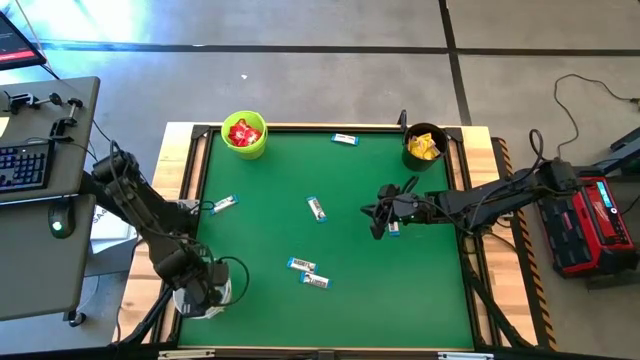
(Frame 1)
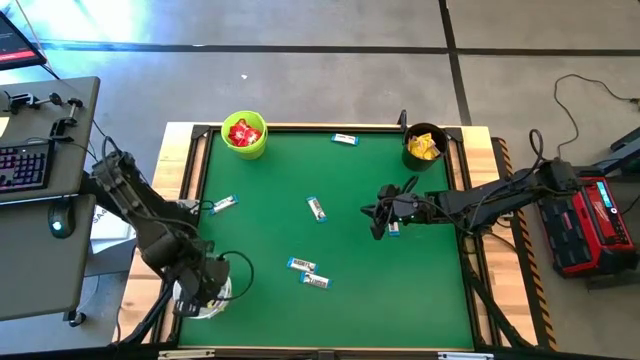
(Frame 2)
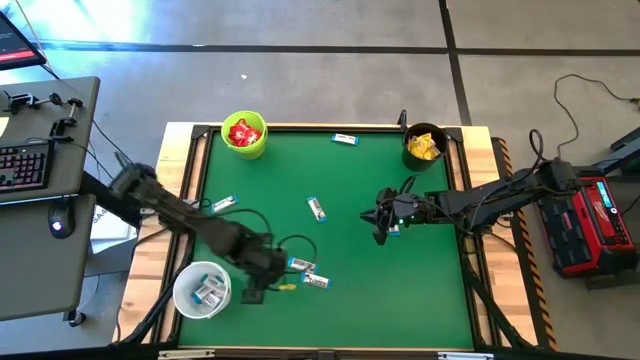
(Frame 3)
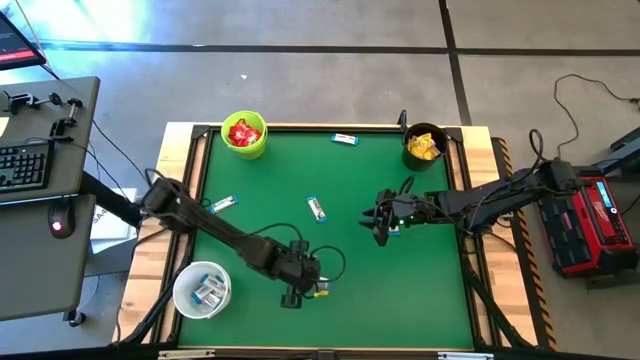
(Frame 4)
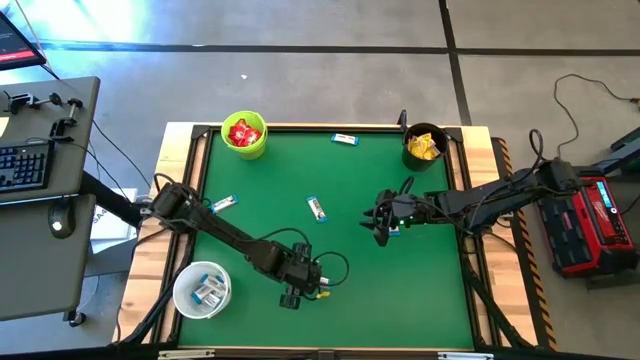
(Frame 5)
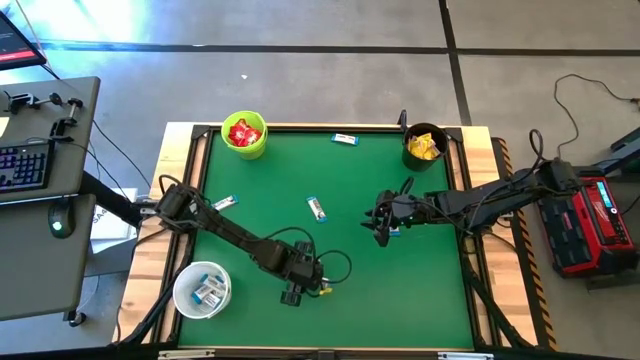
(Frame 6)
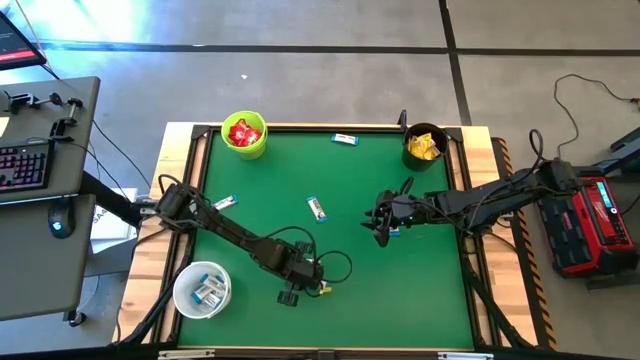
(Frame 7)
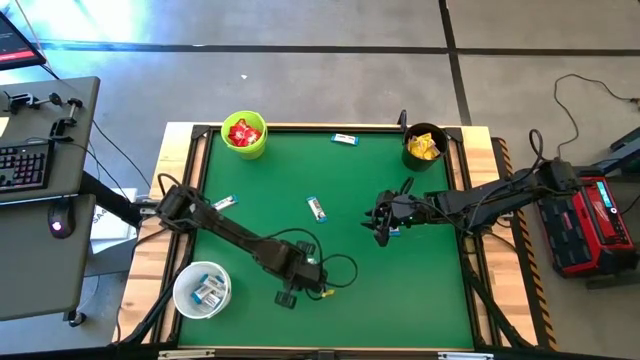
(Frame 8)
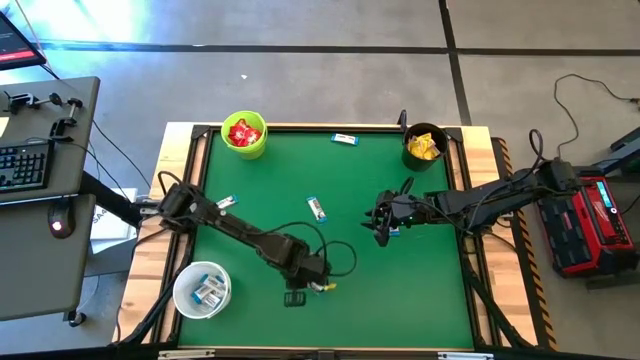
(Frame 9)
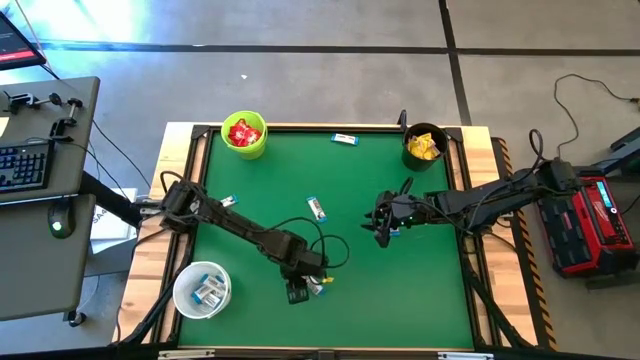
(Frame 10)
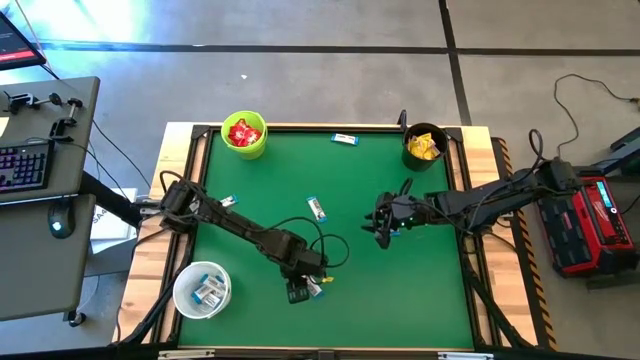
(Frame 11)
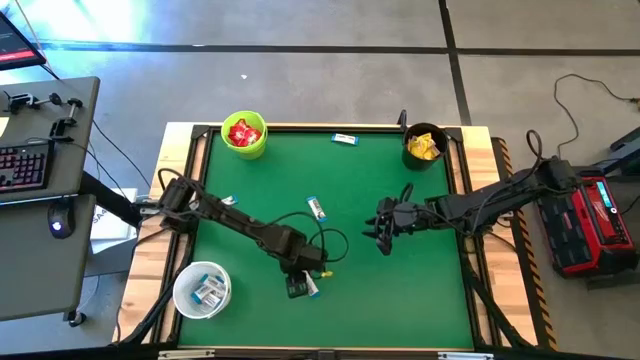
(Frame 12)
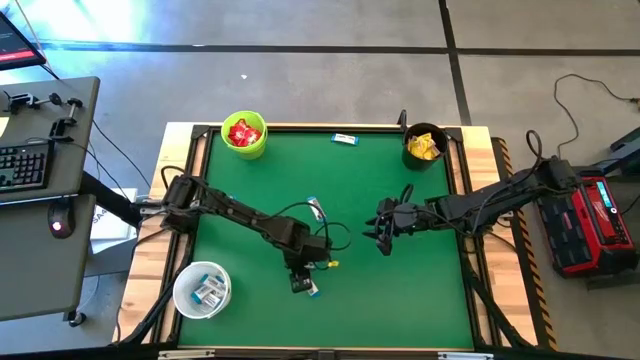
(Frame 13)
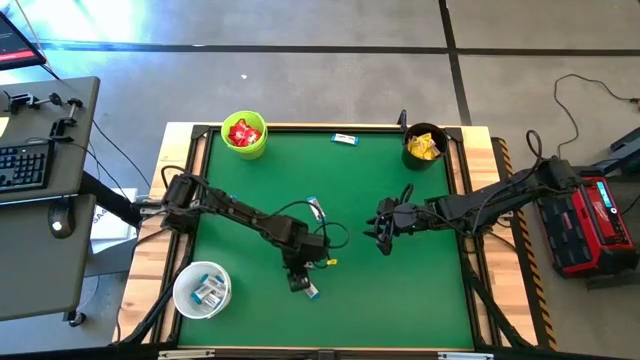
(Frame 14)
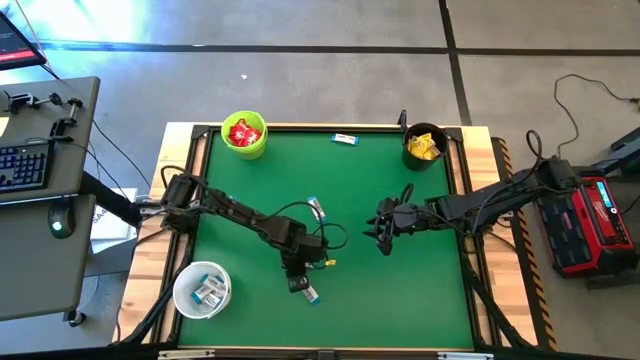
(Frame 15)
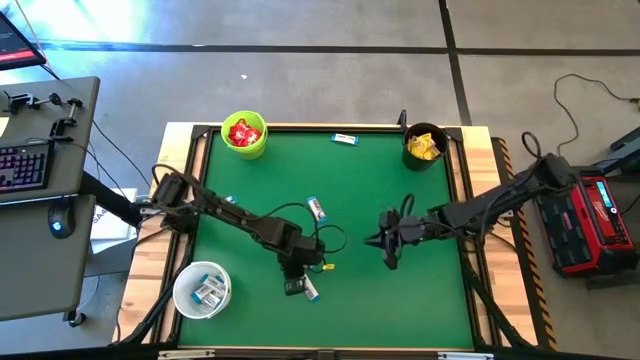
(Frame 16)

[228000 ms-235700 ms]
Task: Sort candy by brand, put in halloween buckets
Put the white chocolate into the white bucket

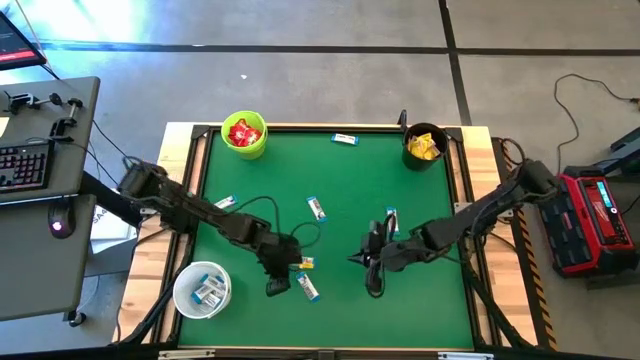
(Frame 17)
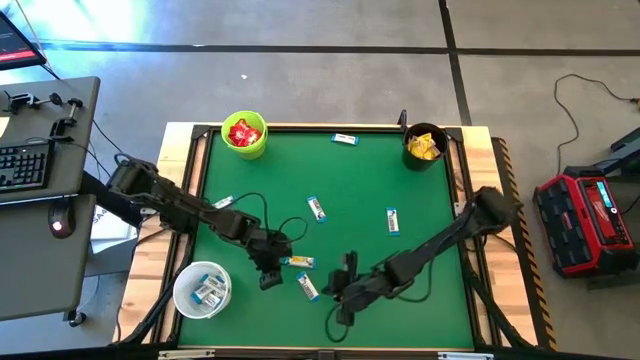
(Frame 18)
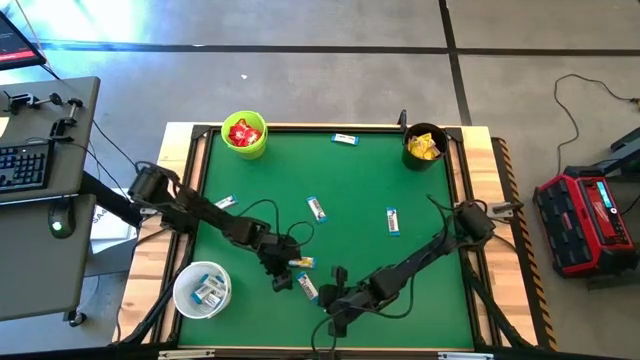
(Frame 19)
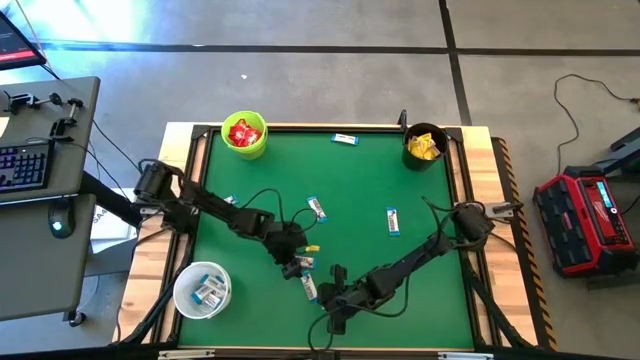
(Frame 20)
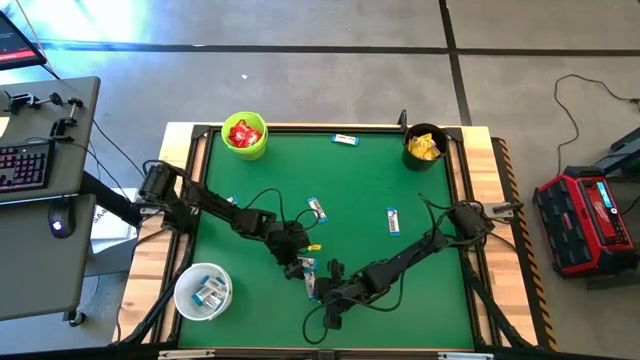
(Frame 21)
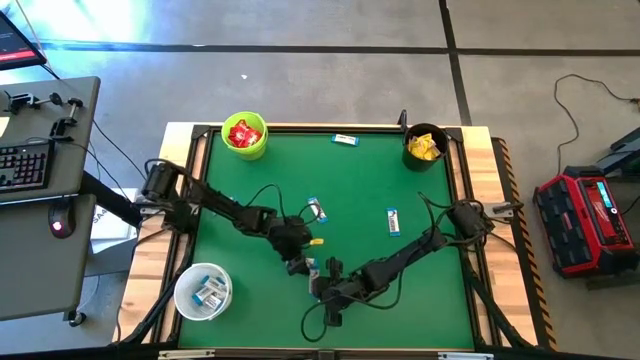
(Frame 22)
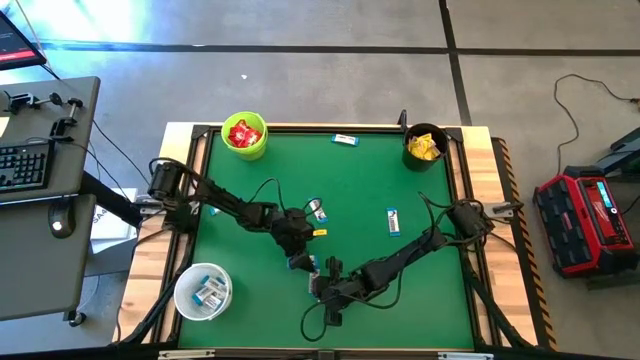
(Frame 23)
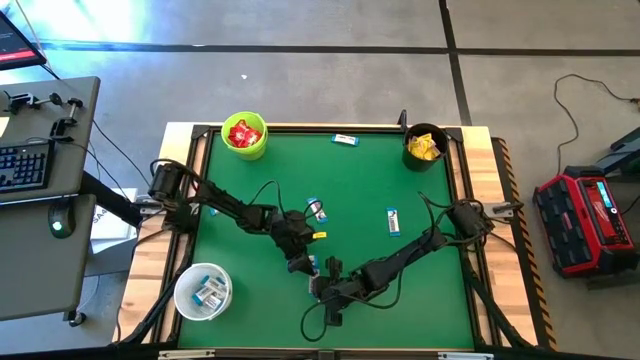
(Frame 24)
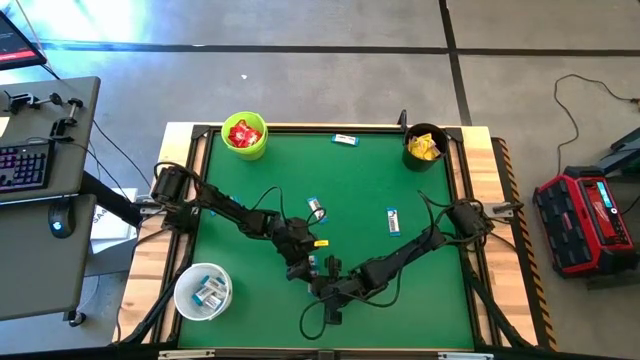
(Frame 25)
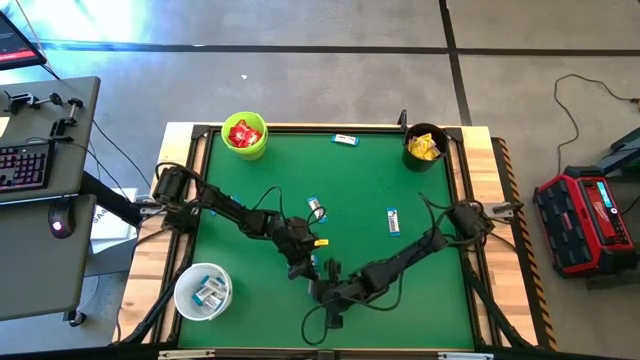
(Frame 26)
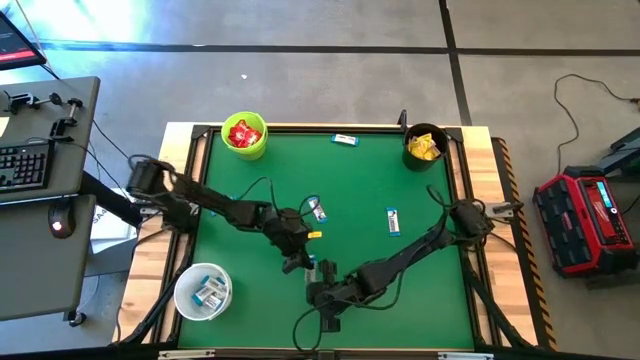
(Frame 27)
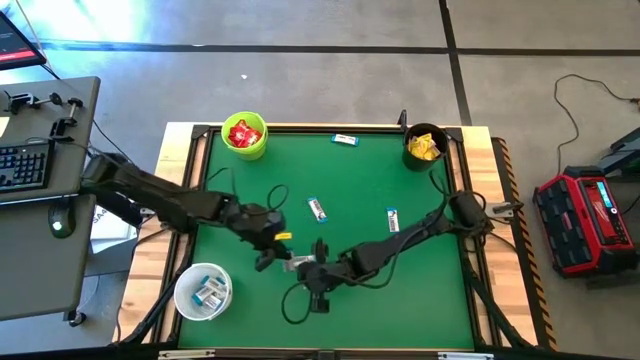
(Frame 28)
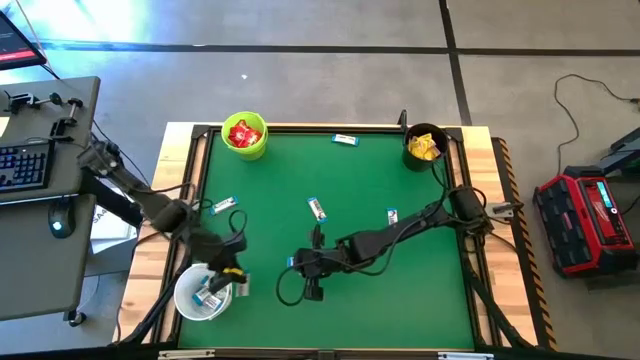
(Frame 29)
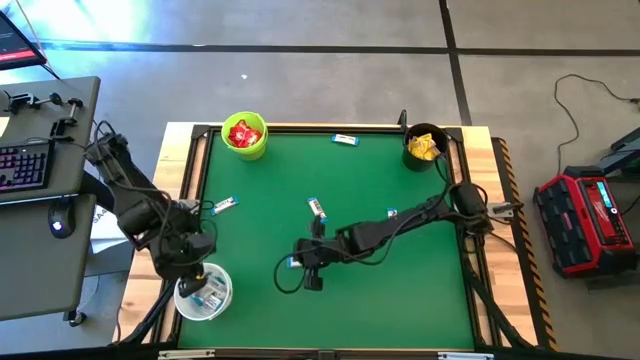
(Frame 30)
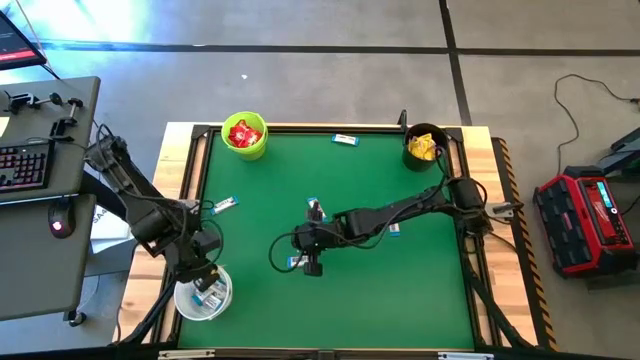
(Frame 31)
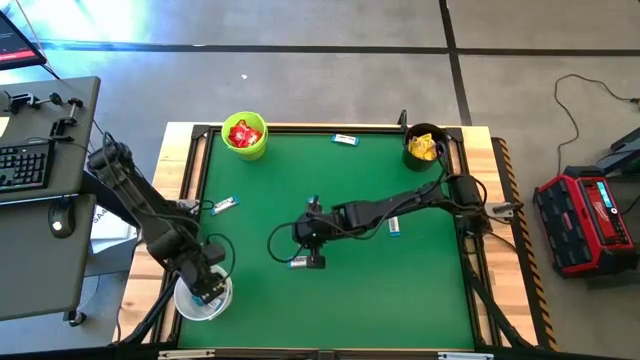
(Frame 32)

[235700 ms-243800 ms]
Put the white chocolate into the white bucket

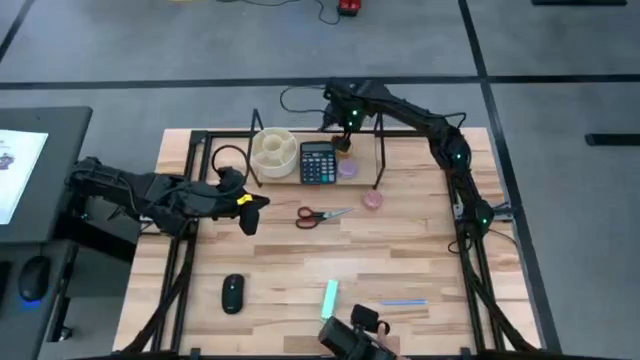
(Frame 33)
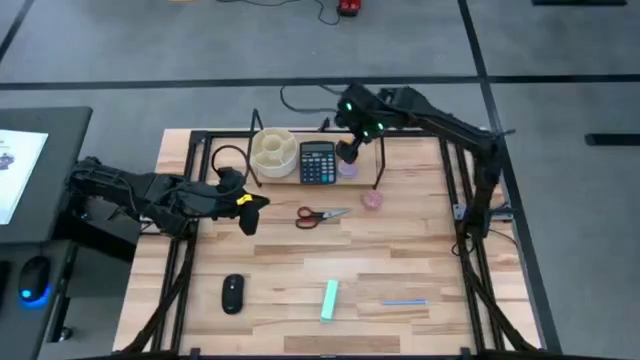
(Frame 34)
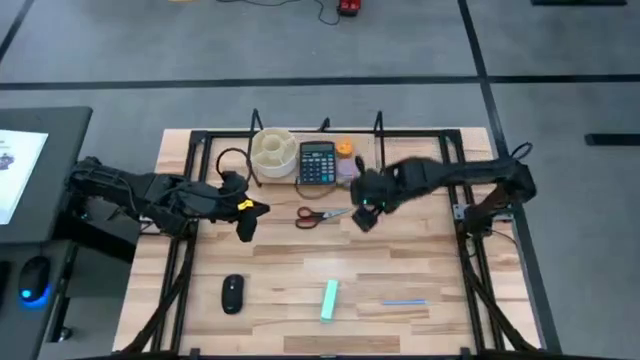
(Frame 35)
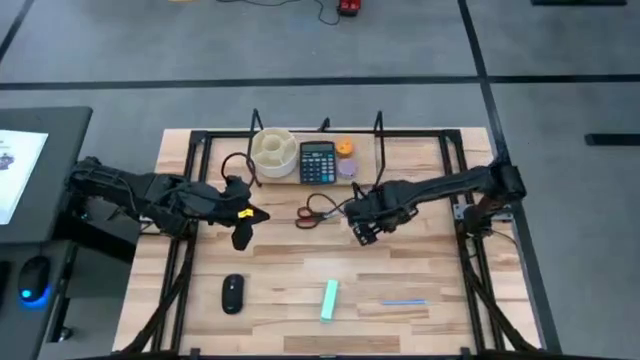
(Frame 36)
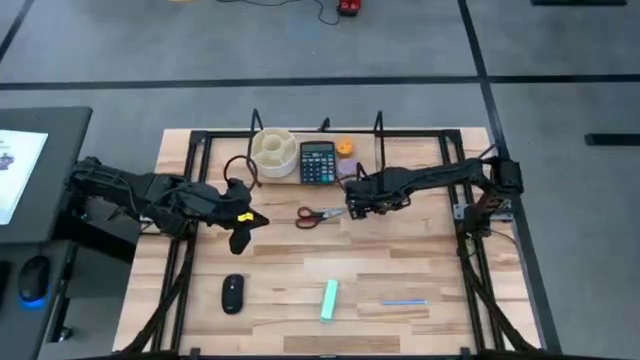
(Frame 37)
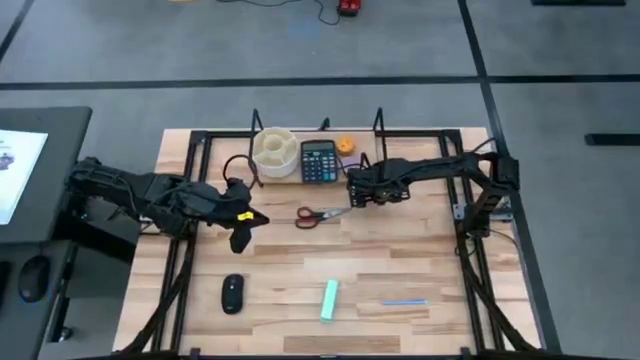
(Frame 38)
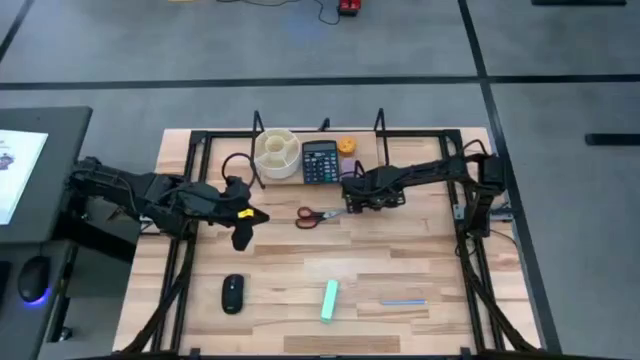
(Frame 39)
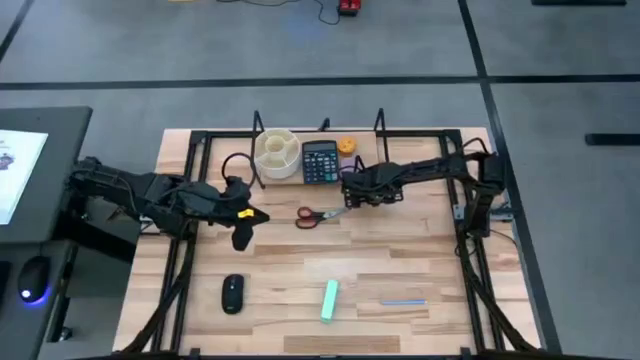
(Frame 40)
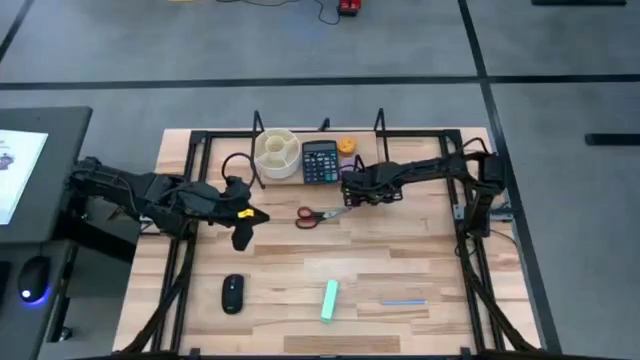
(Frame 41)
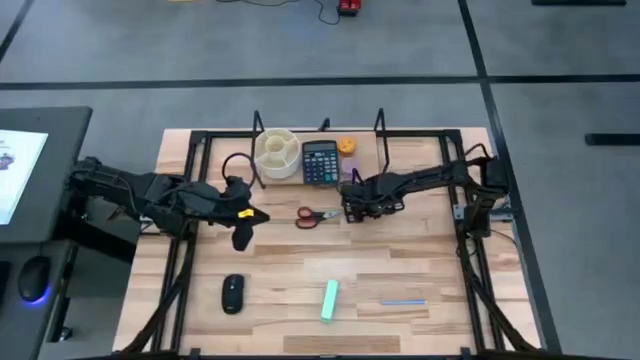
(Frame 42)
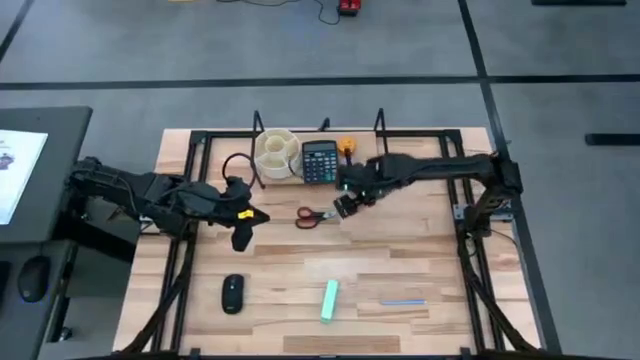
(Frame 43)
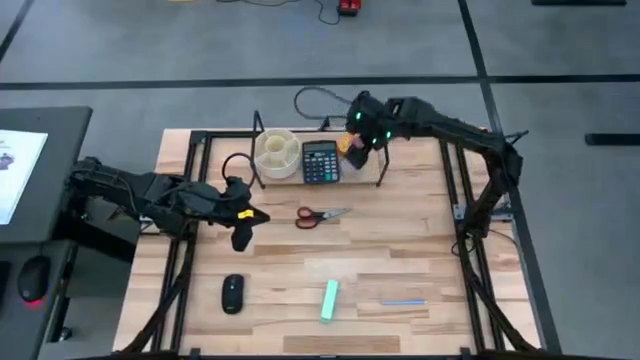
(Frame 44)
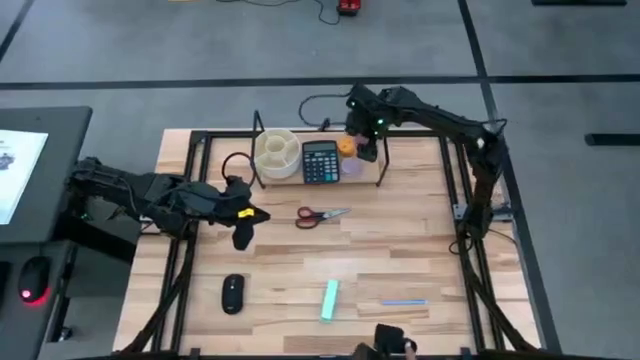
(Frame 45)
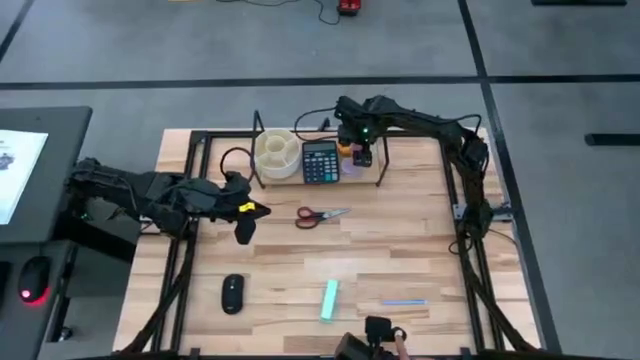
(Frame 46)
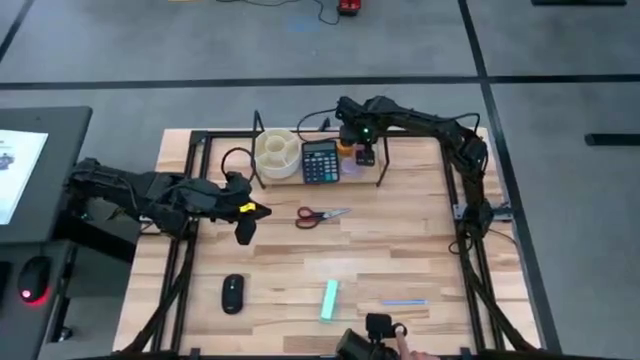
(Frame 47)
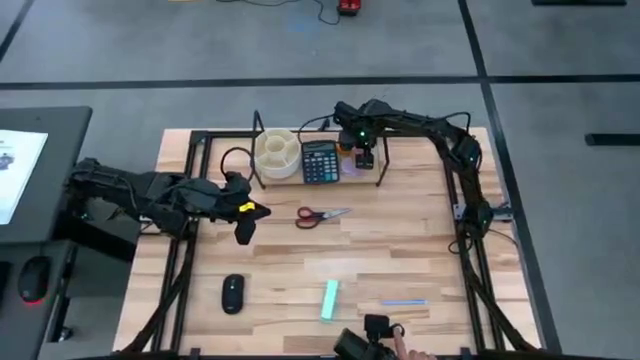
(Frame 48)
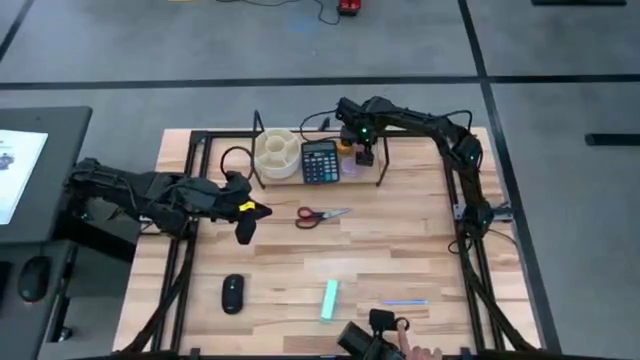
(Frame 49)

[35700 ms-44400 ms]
Task: Stock shelves
Put the pink scented candle on the shelf
